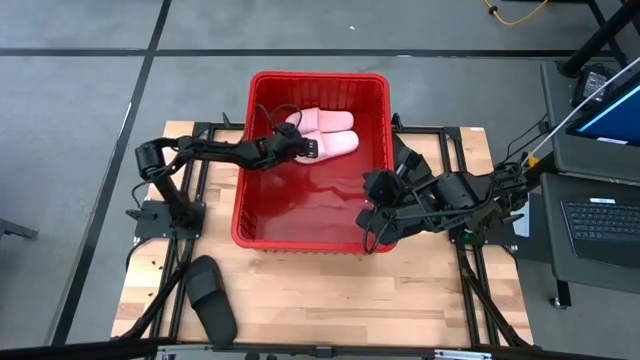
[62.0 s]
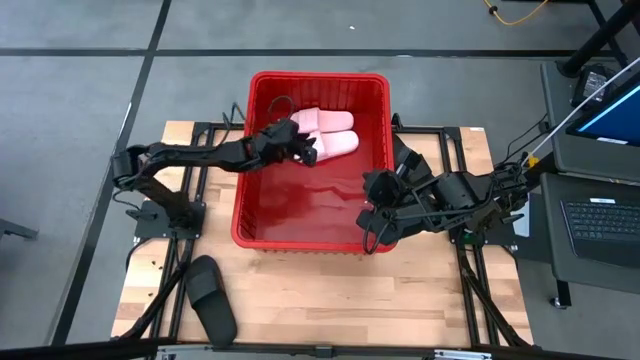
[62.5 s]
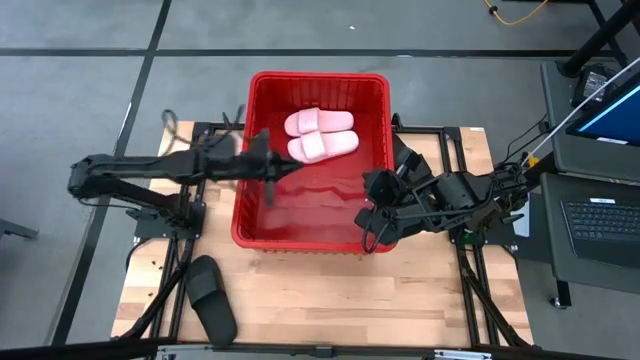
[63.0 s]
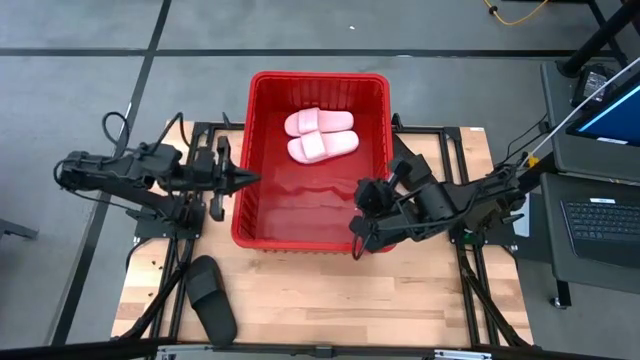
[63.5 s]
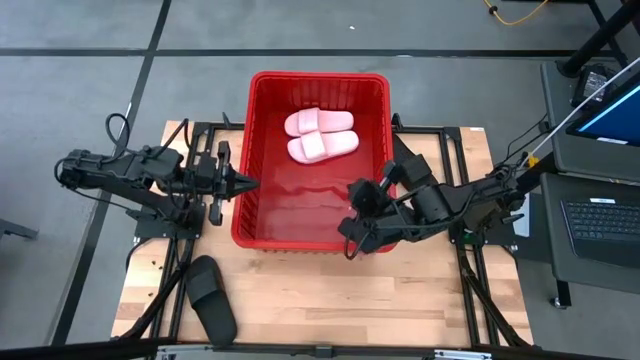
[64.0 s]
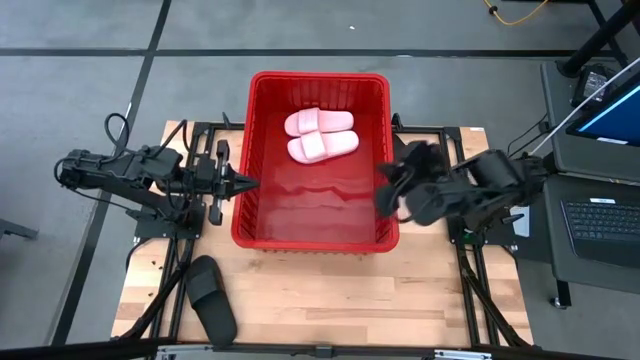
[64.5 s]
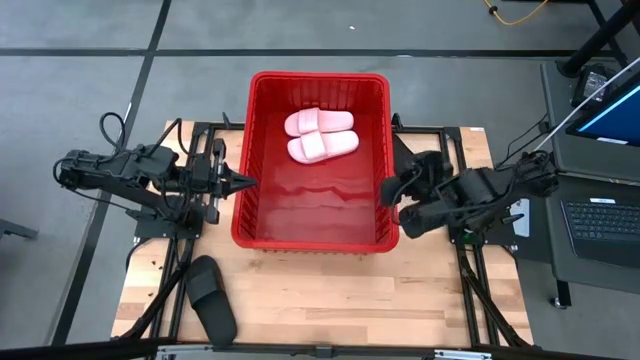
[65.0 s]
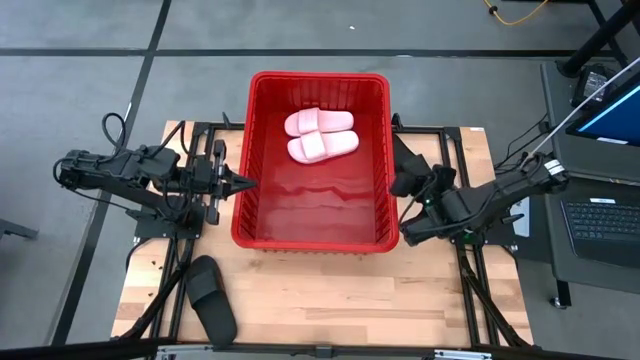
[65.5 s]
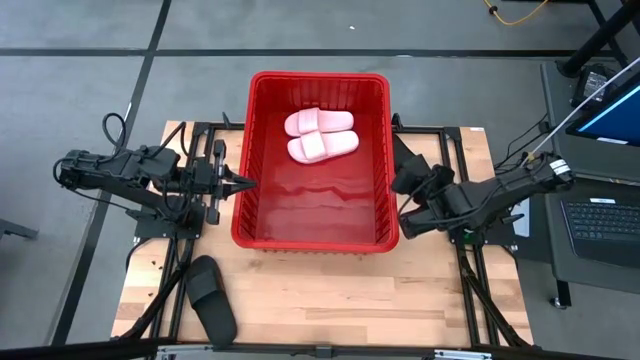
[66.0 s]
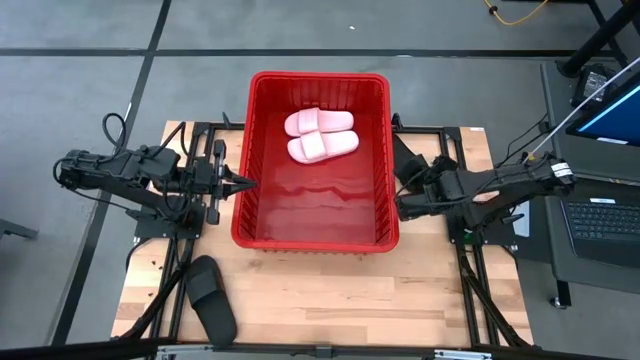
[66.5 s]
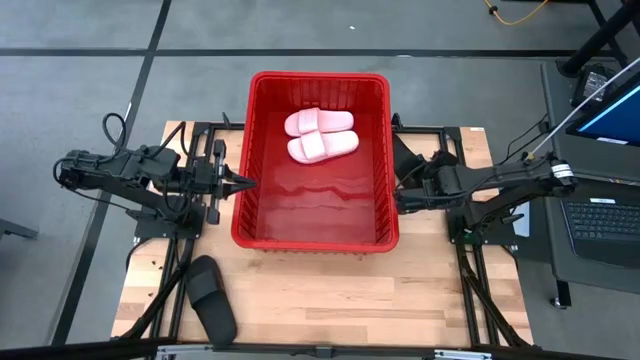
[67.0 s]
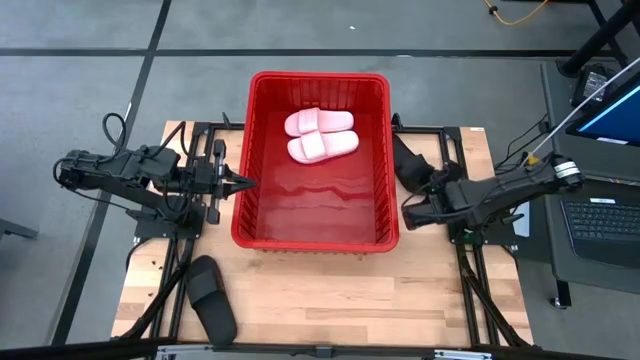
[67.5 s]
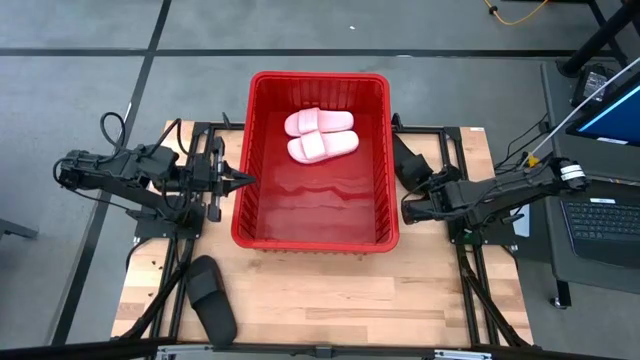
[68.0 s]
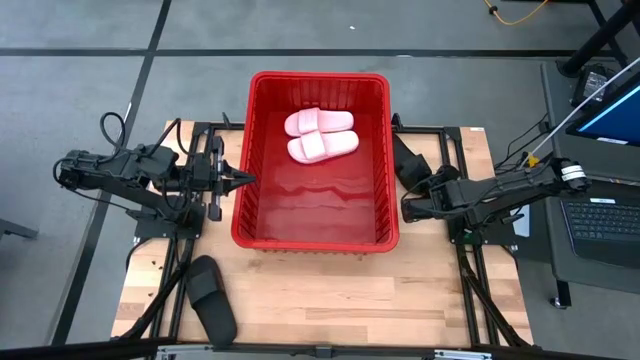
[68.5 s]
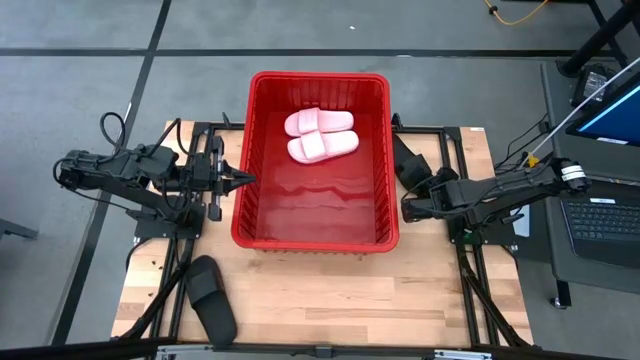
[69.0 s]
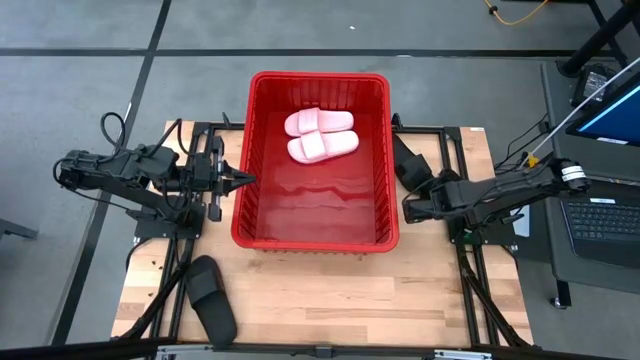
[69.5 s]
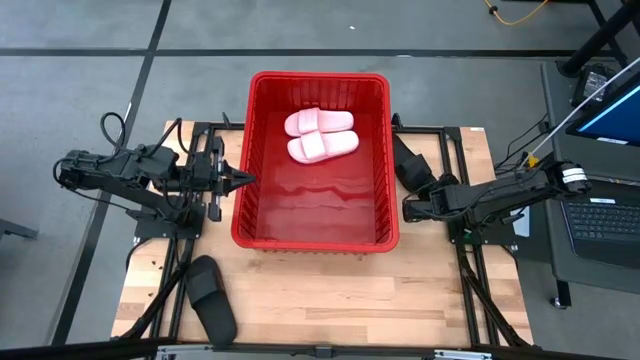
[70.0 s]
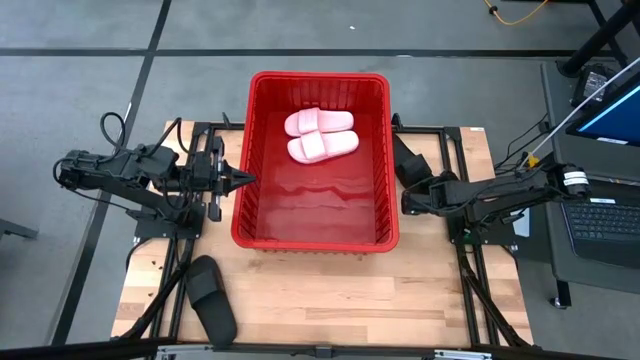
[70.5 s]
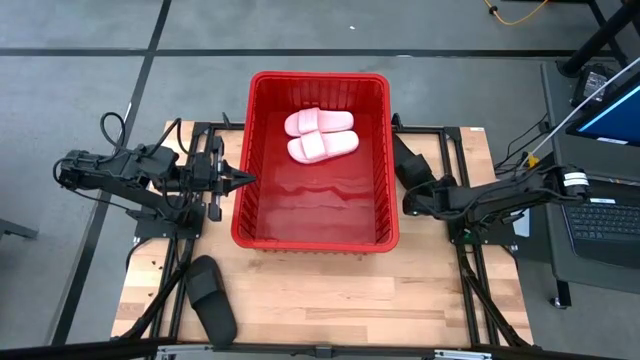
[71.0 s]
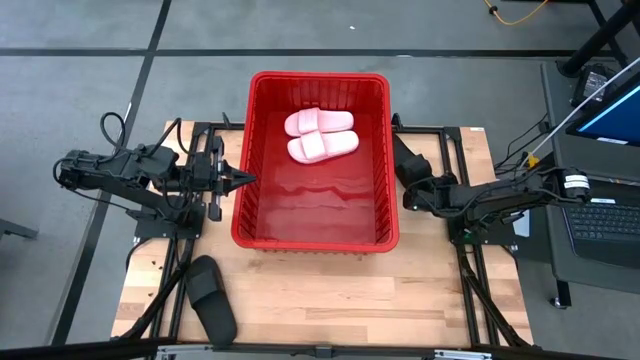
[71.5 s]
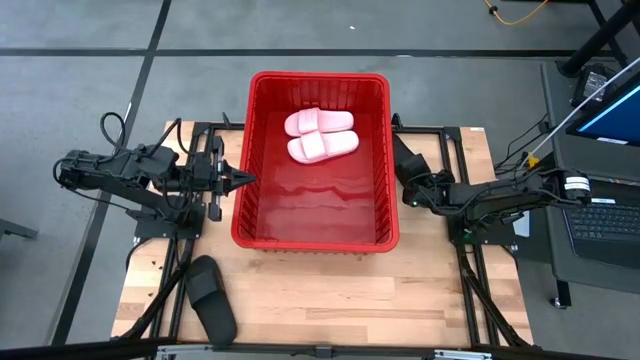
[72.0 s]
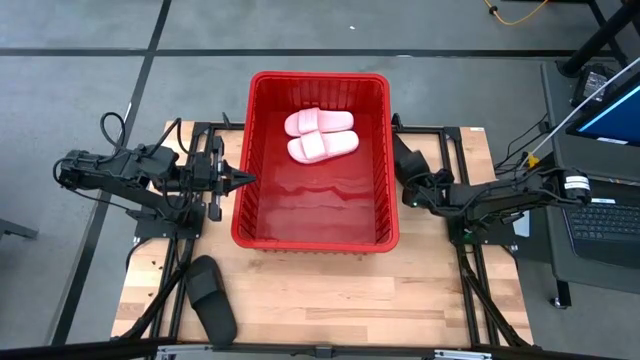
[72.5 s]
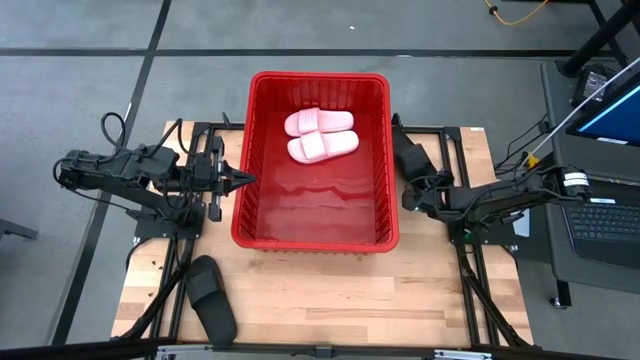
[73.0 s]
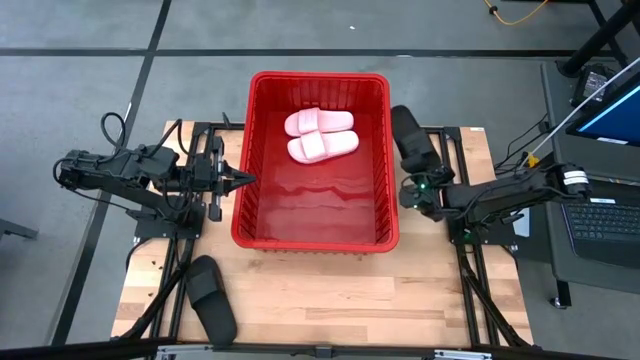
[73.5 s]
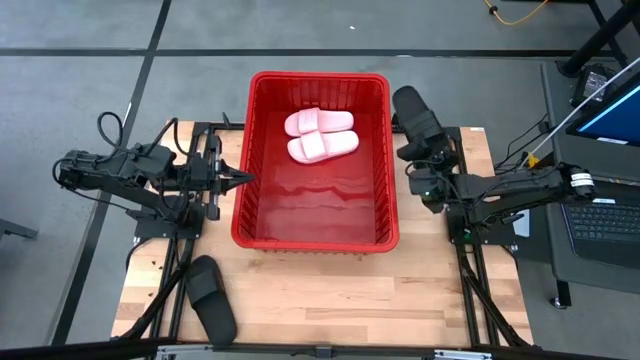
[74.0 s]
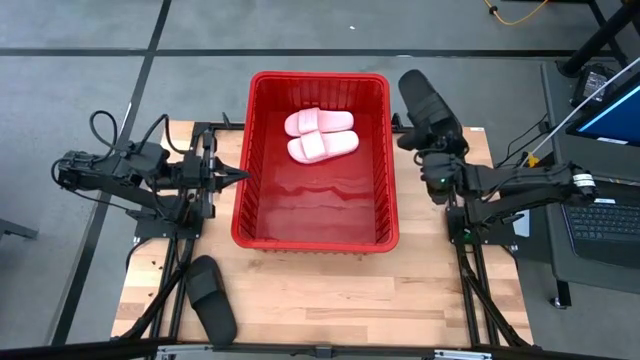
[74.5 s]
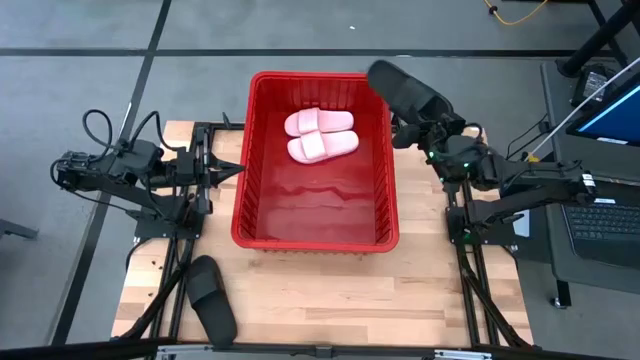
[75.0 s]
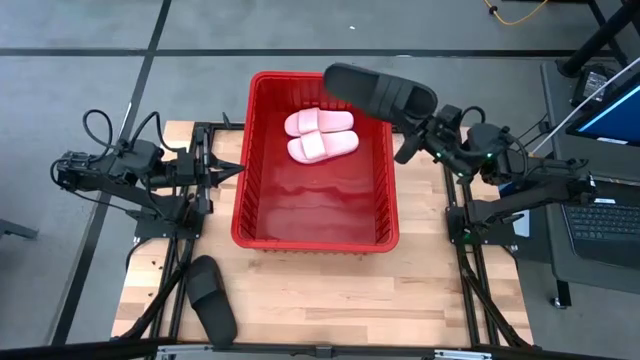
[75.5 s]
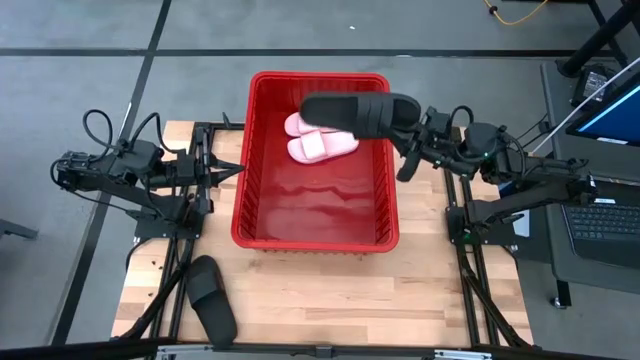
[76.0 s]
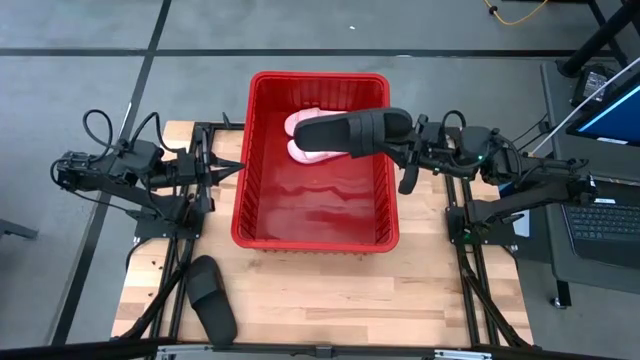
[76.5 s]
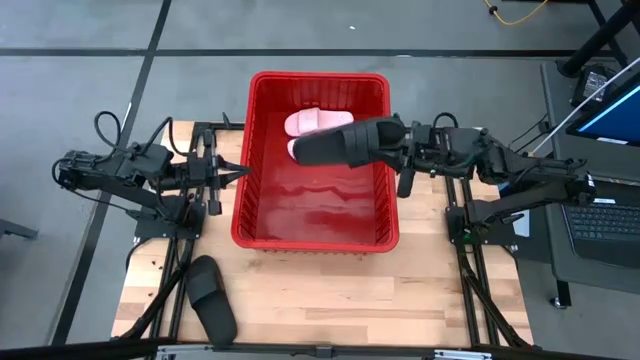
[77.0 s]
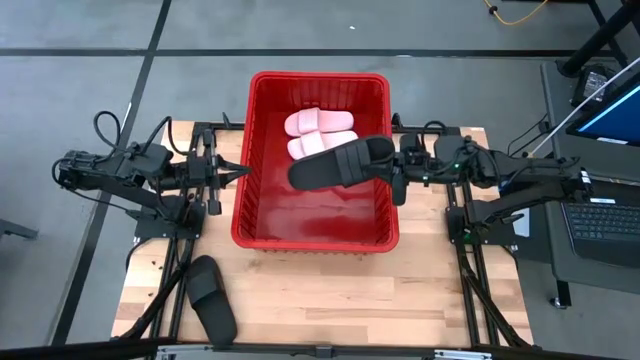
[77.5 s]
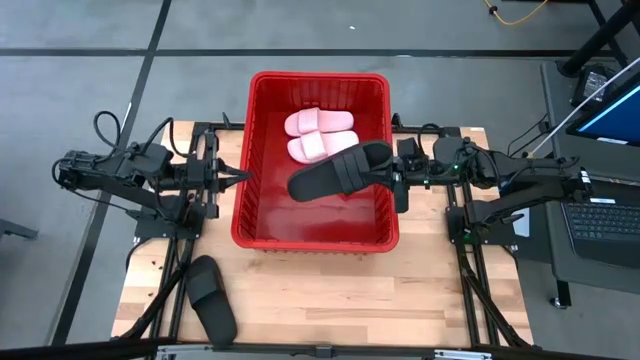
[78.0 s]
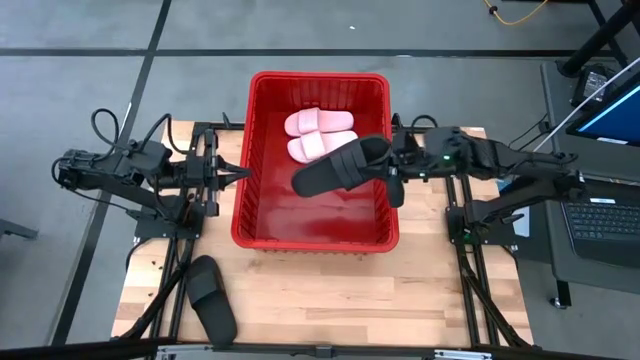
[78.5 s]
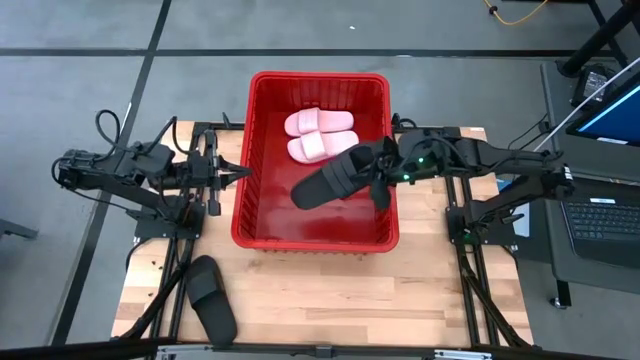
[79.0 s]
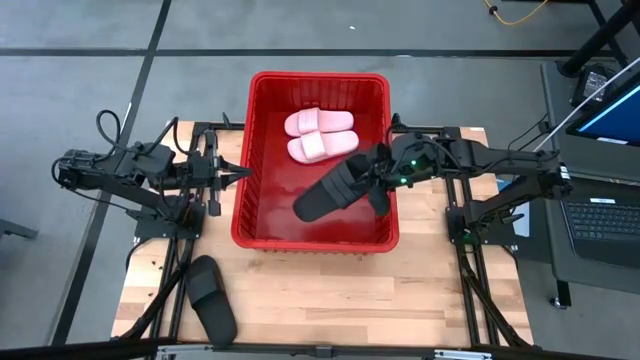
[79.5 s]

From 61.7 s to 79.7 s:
Task: Pick and place slides into bin
Put the right black slide into the bin

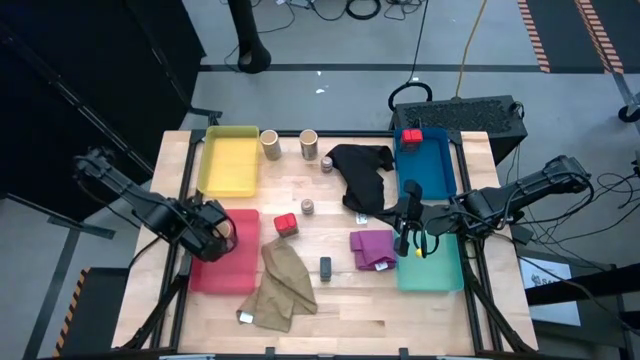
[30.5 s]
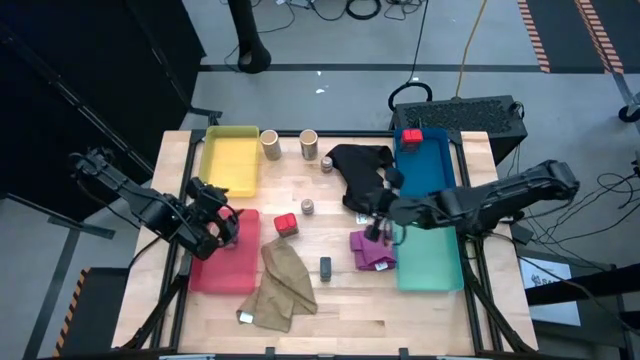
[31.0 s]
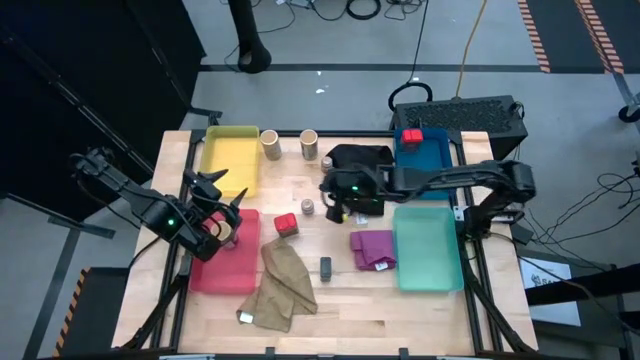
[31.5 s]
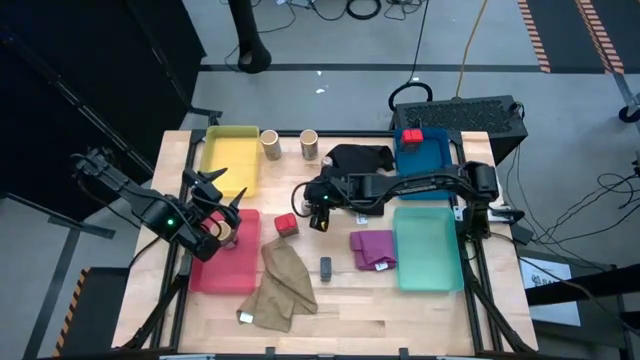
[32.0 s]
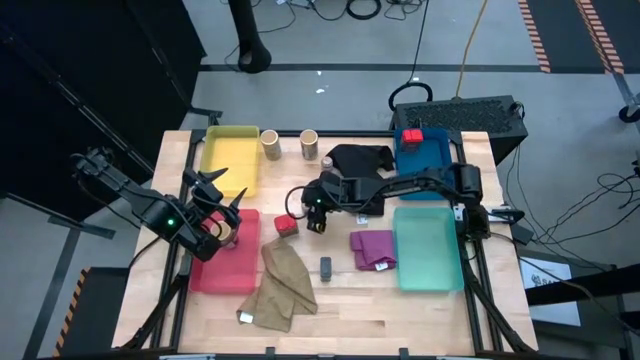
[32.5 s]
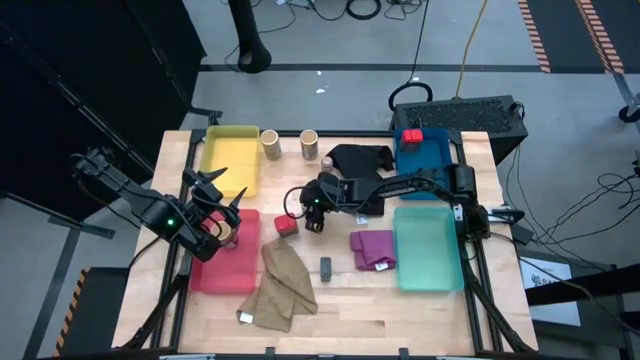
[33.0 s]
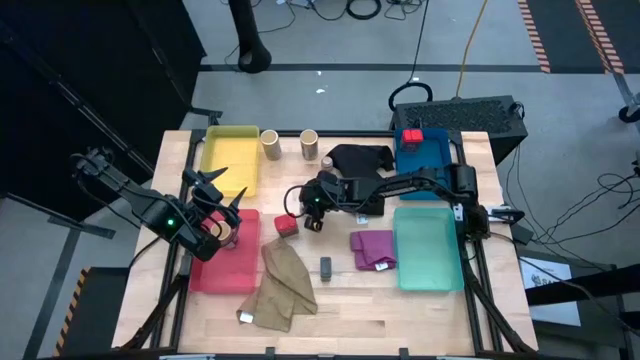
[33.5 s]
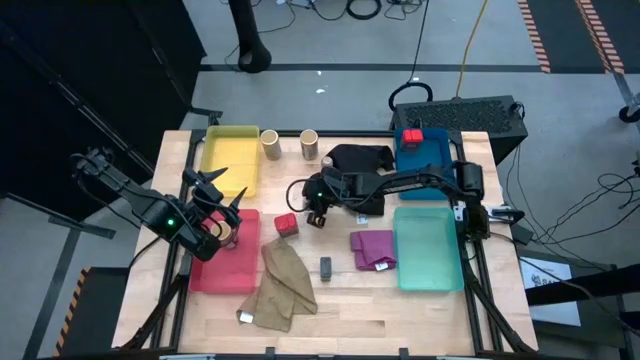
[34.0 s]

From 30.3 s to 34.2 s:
Task: Sort spices by type
Put the bottom brown seasoning bottle into the green bin
